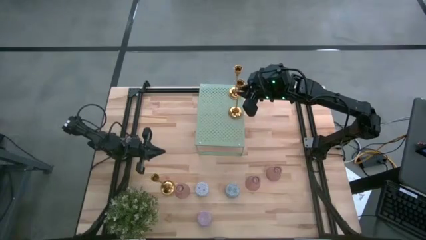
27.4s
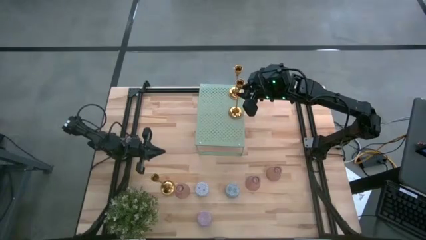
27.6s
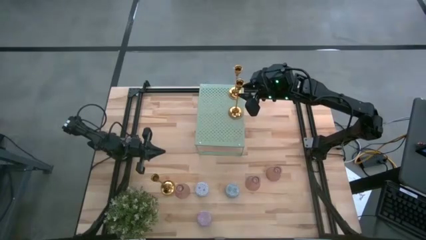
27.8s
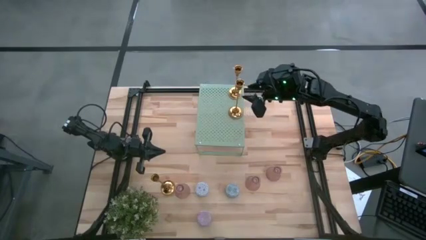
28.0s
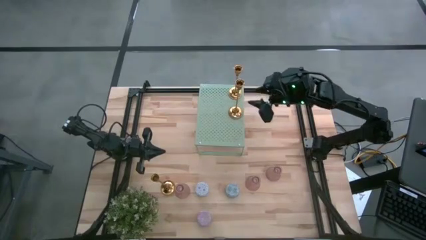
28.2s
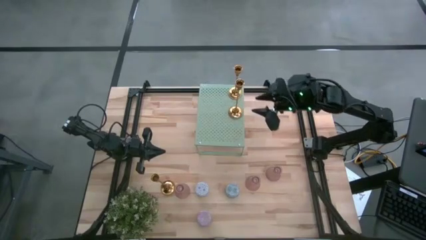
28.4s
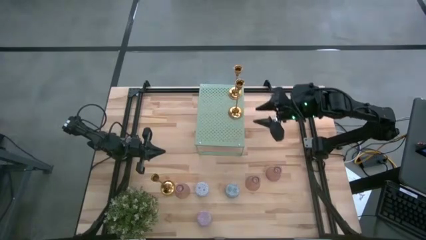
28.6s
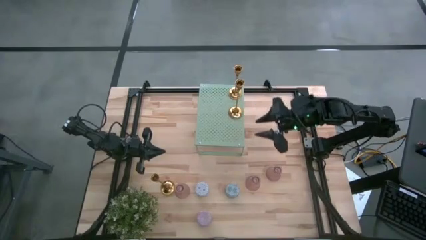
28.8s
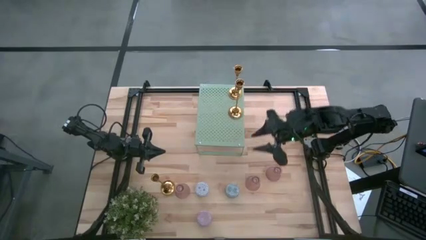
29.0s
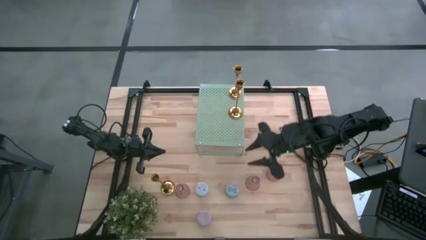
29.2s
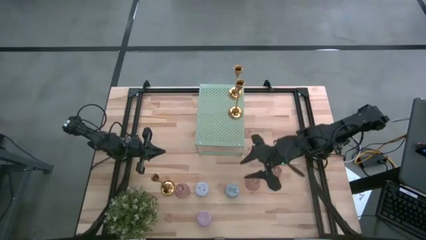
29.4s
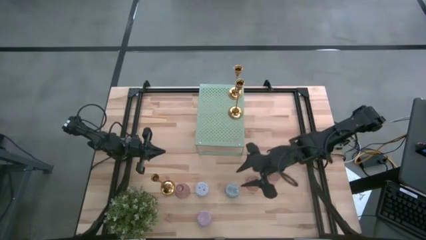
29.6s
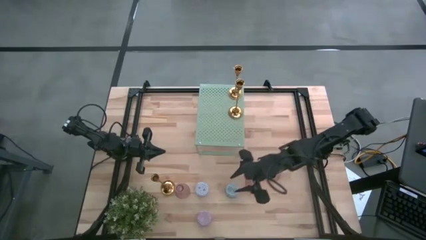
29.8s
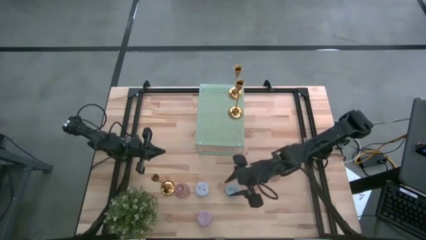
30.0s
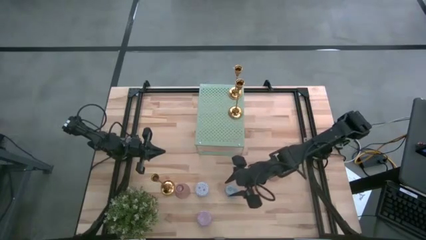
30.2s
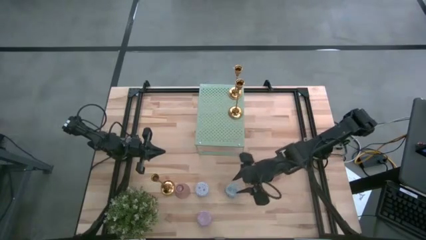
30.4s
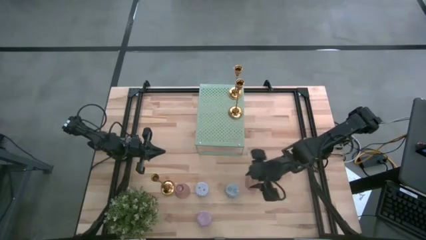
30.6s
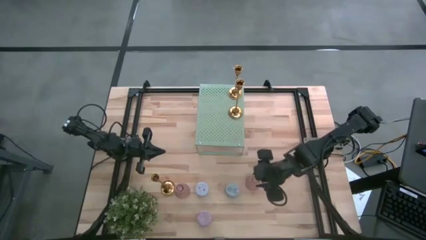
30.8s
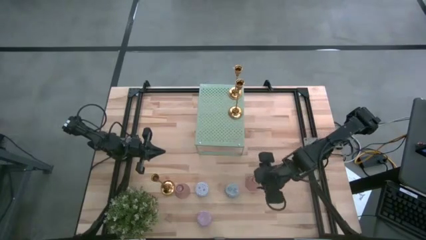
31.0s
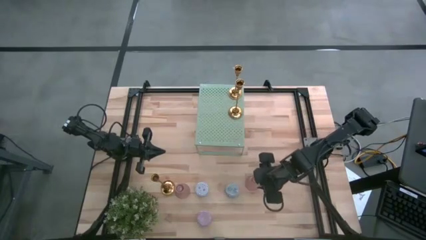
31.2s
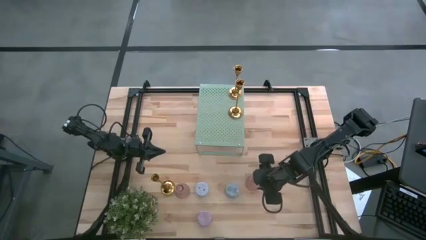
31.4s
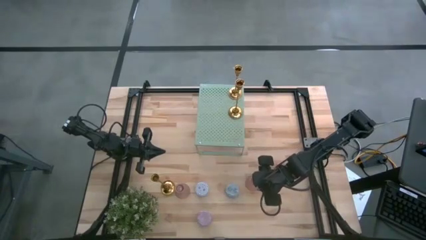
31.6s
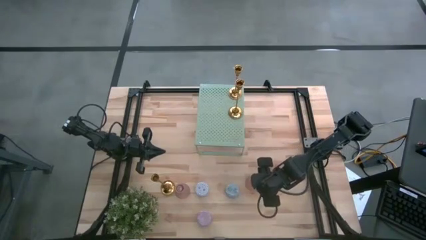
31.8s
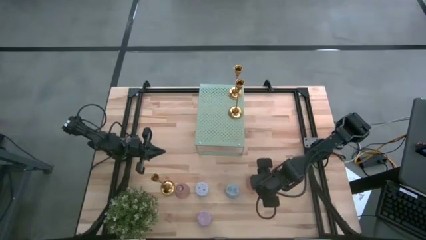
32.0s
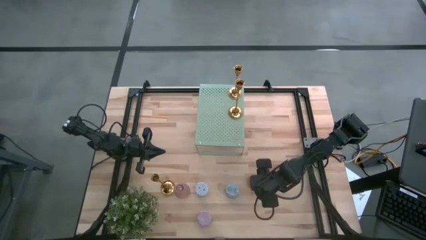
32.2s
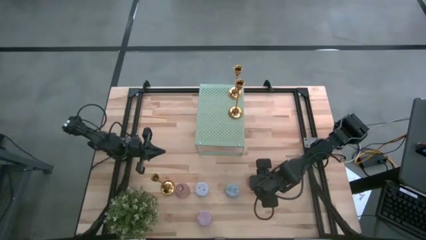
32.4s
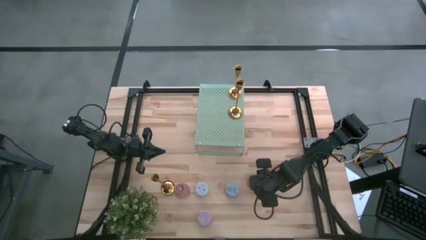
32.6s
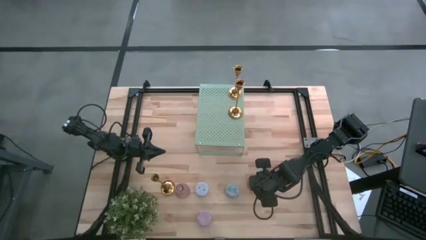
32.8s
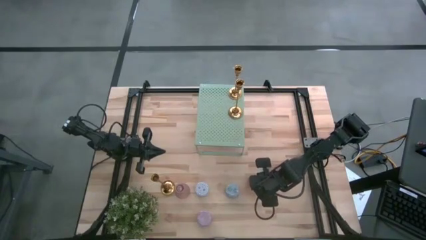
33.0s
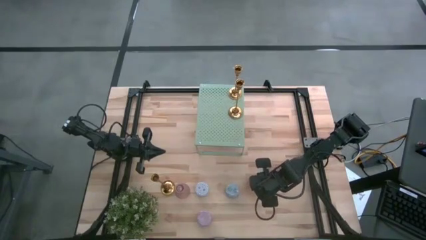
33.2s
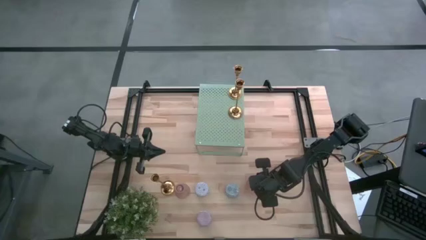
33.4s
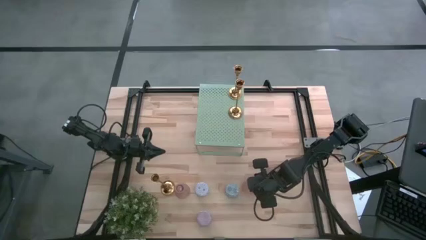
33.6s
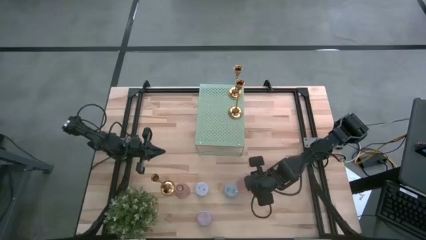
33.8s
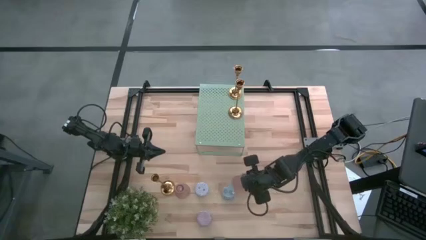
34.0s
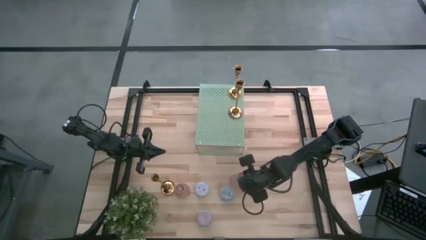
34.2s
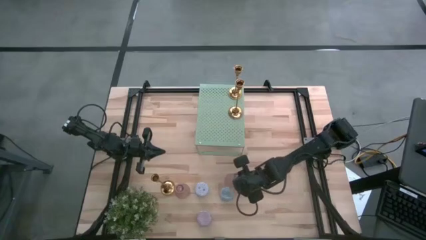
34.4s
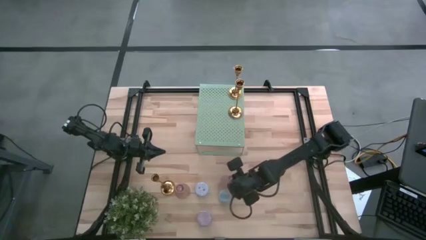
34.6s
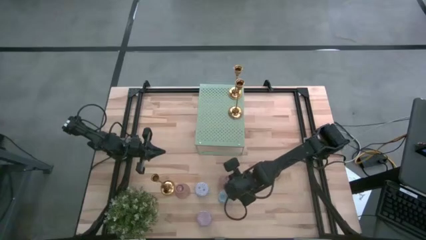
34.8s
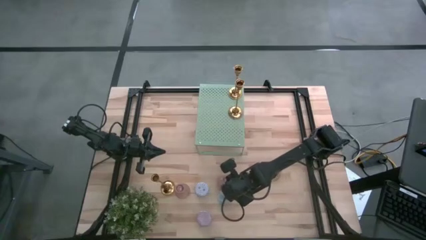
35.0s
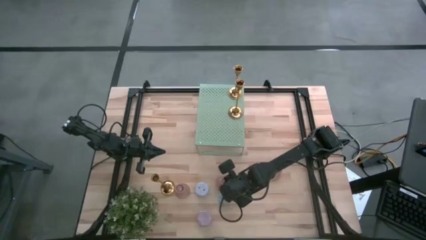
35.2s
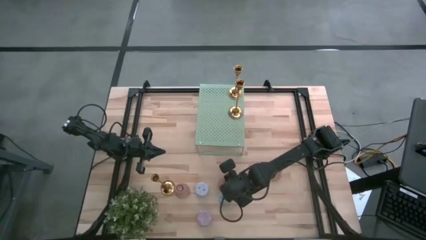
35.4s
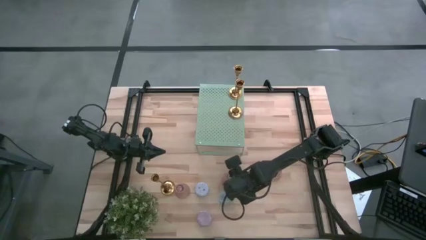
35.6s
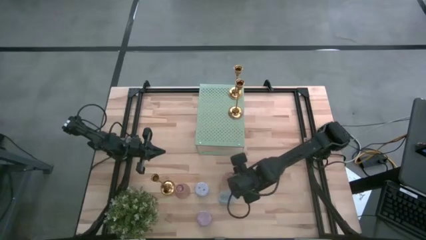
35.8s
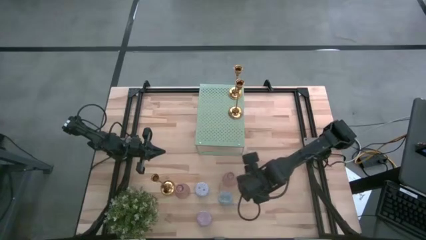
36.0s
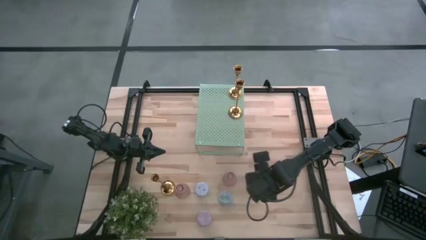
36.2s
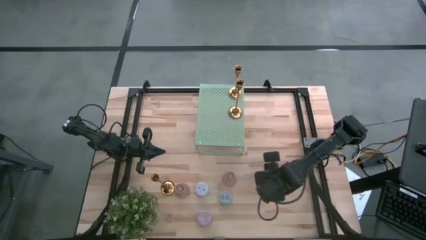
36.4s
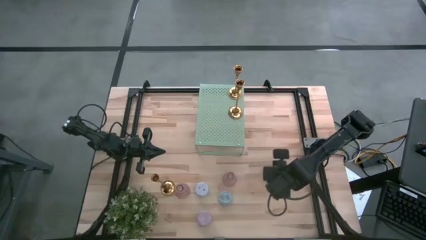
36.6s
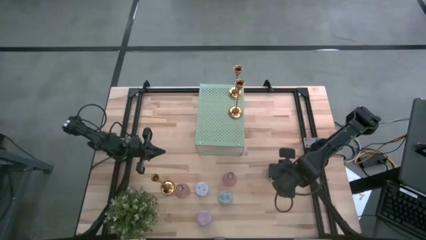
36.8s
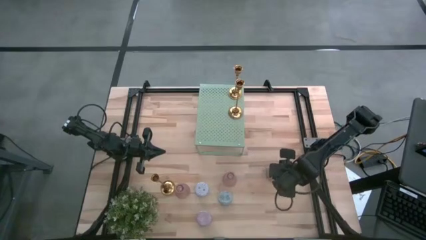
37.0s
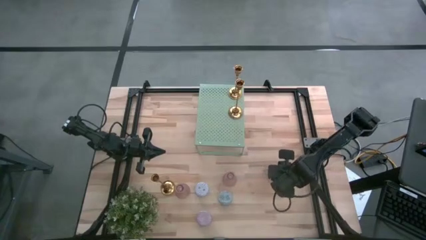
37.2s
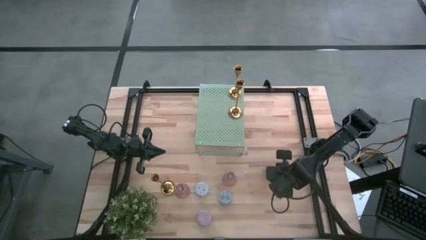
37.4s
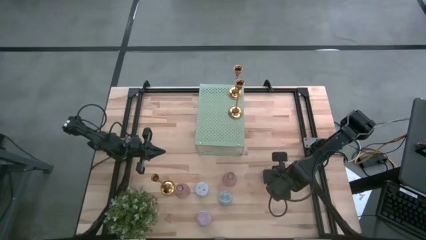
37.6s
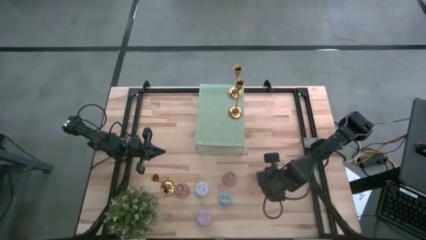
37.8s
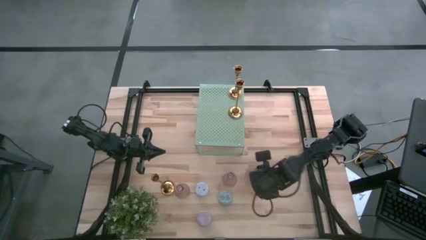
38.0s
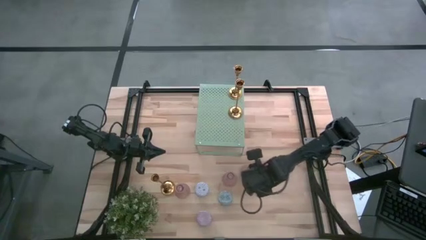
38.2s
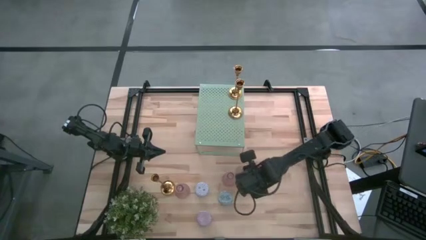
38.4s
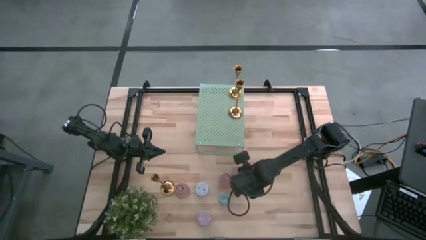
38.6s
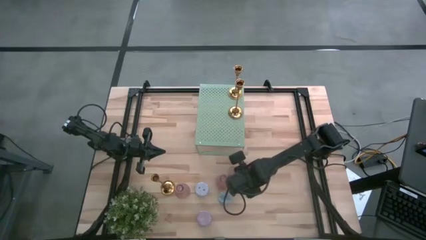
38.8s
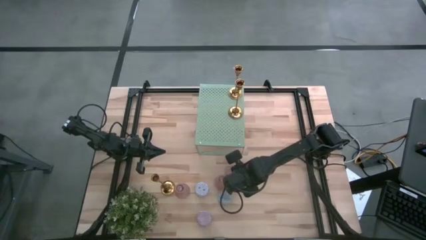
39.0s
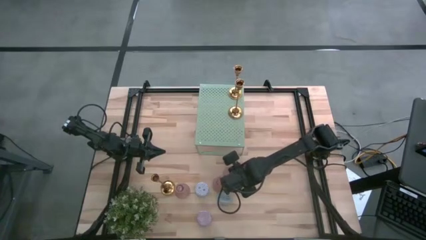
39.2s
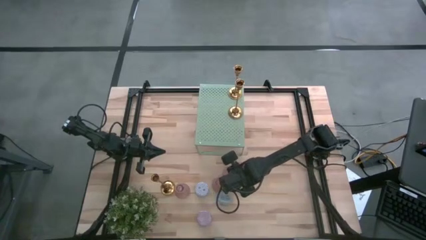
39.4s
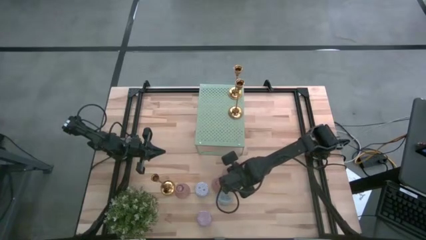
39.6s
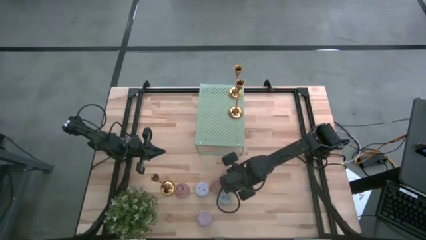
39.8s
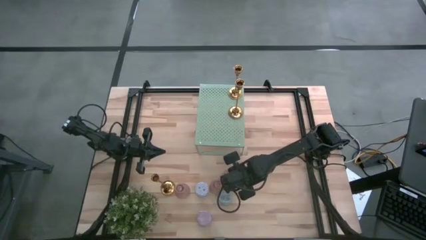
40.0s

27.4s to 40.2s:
Task: Pick & Place candle stick holders
Move the pink candle holders to the center
